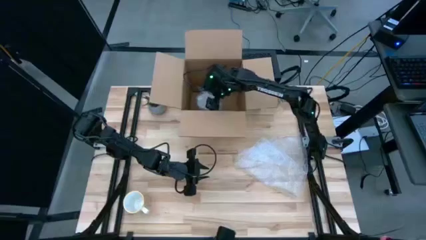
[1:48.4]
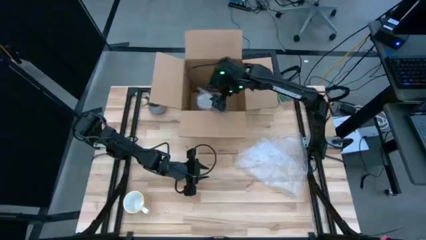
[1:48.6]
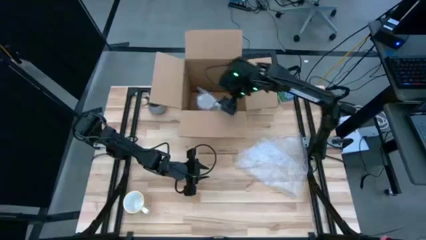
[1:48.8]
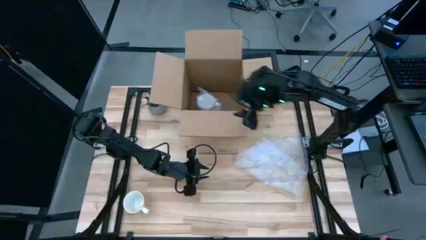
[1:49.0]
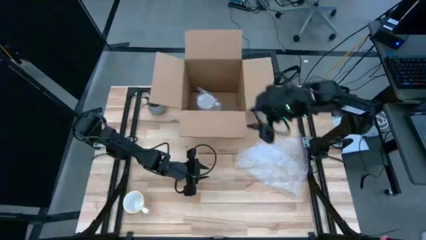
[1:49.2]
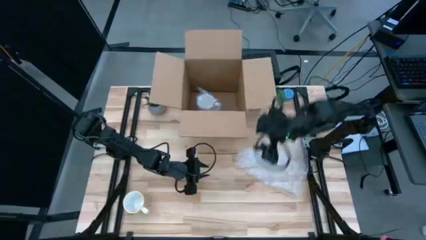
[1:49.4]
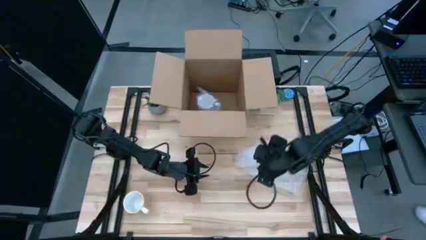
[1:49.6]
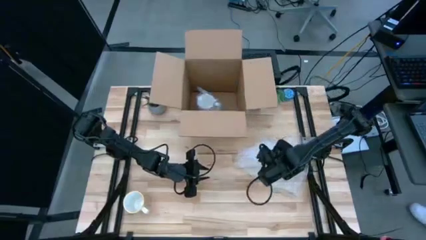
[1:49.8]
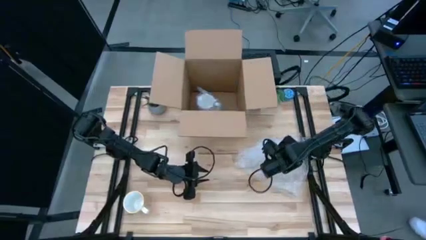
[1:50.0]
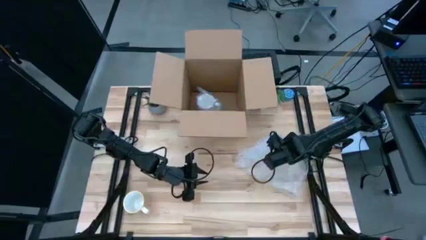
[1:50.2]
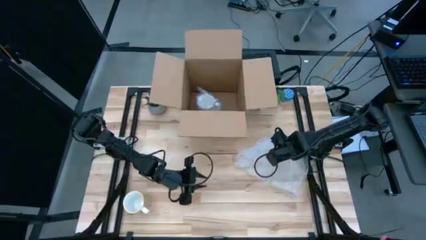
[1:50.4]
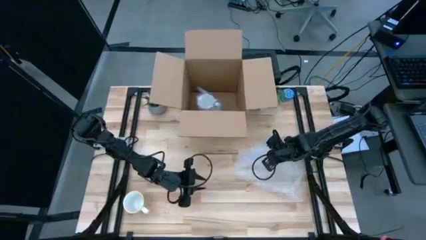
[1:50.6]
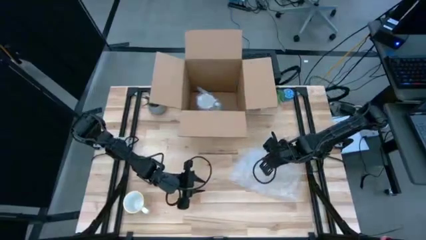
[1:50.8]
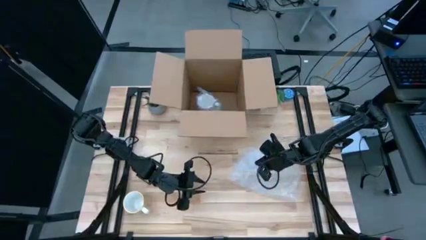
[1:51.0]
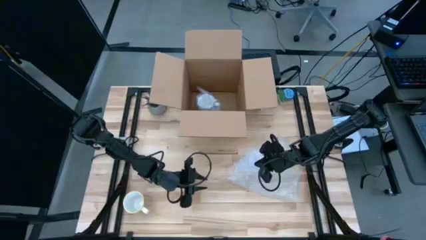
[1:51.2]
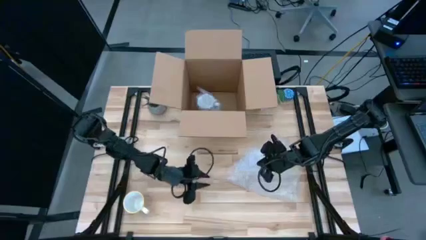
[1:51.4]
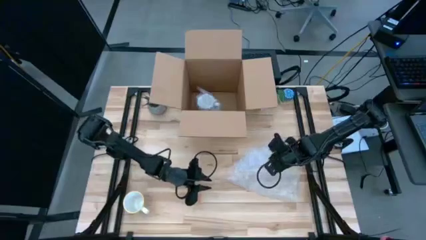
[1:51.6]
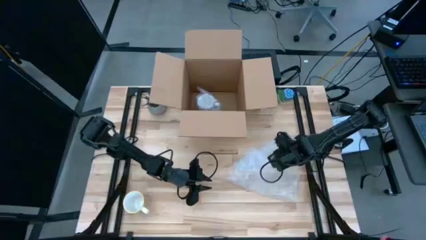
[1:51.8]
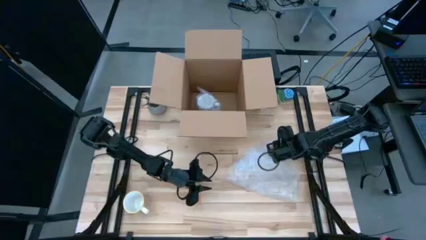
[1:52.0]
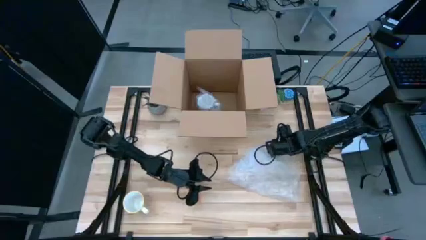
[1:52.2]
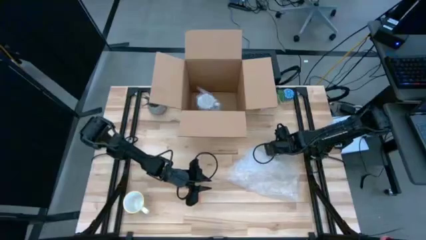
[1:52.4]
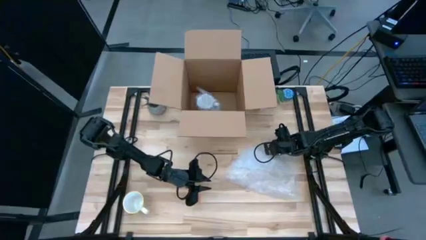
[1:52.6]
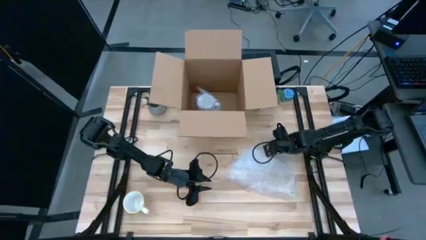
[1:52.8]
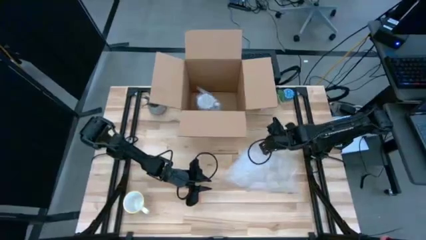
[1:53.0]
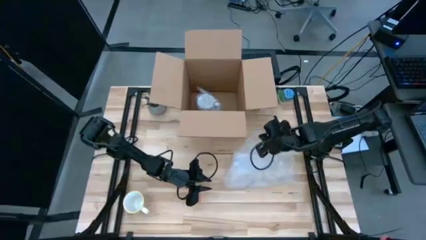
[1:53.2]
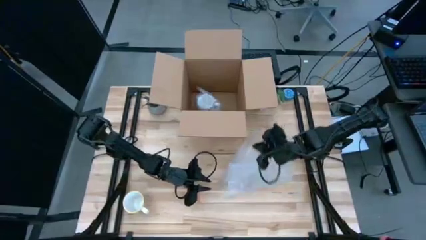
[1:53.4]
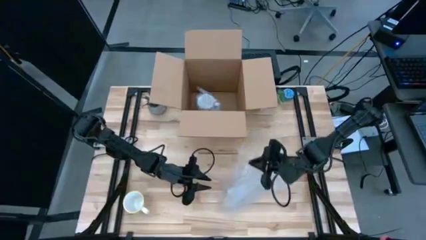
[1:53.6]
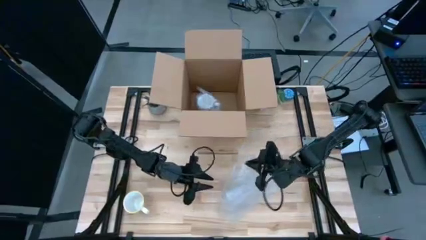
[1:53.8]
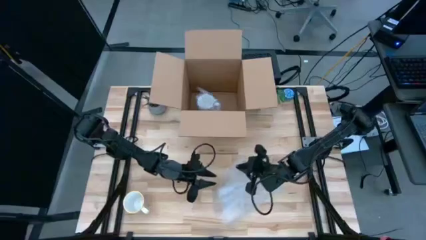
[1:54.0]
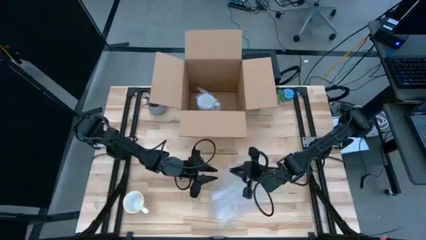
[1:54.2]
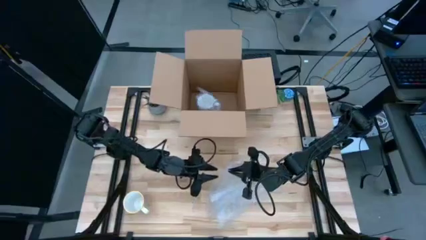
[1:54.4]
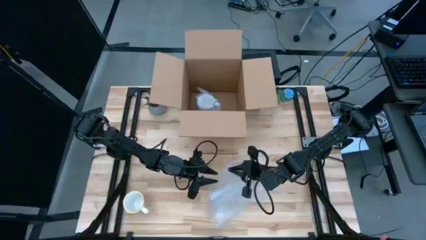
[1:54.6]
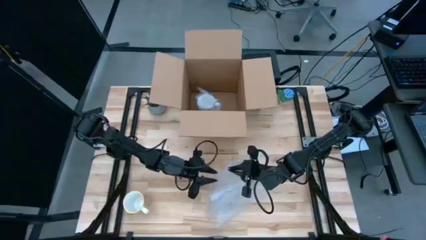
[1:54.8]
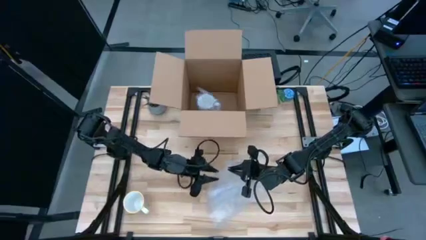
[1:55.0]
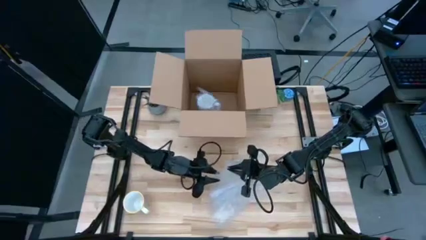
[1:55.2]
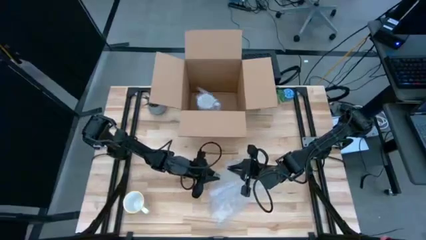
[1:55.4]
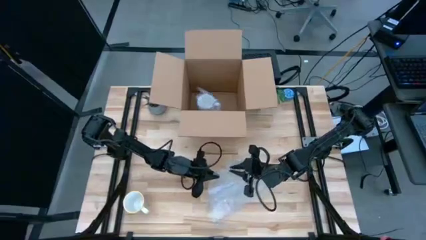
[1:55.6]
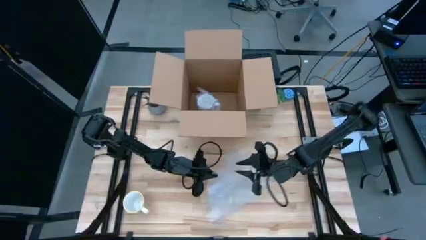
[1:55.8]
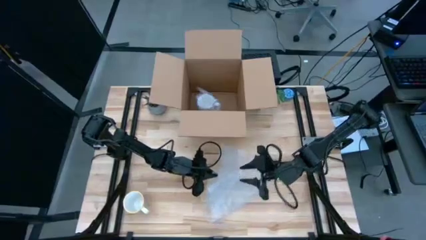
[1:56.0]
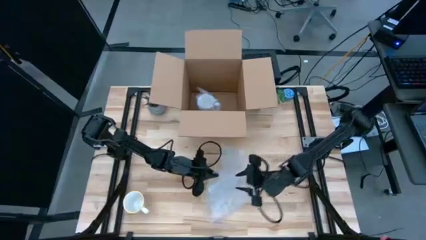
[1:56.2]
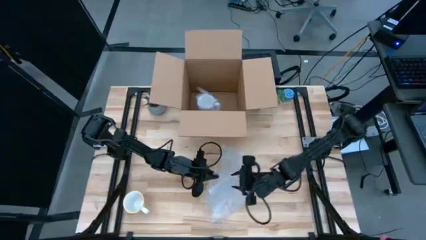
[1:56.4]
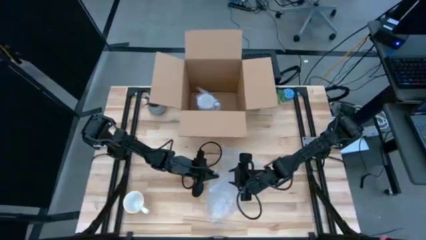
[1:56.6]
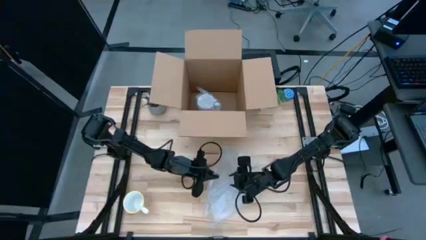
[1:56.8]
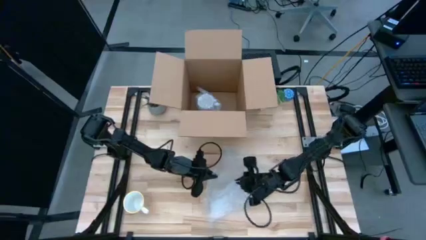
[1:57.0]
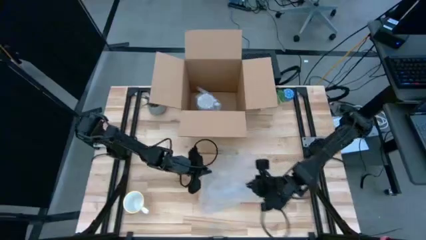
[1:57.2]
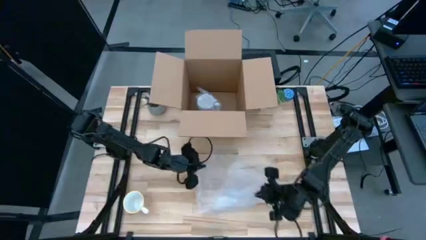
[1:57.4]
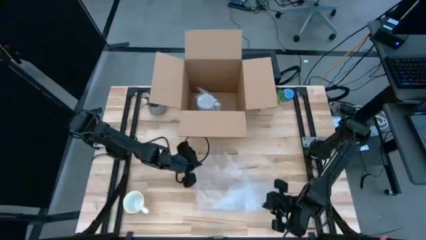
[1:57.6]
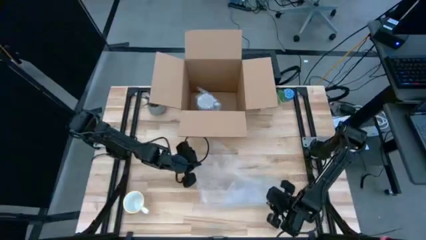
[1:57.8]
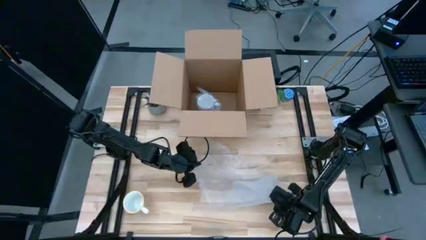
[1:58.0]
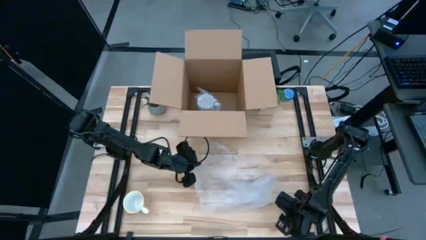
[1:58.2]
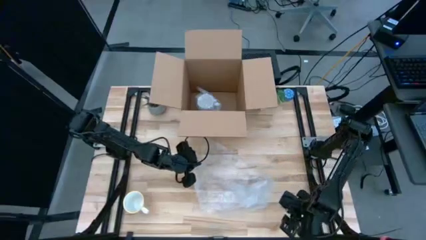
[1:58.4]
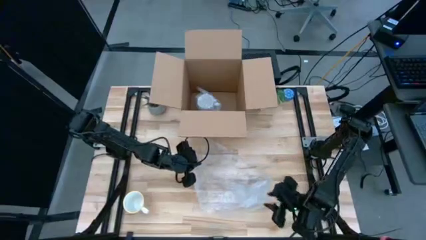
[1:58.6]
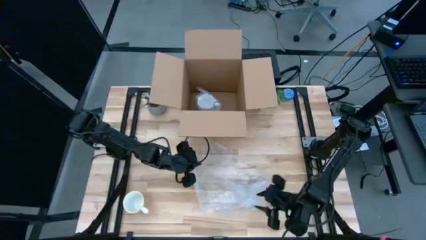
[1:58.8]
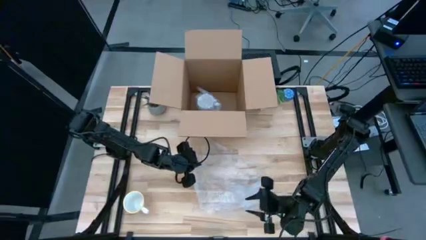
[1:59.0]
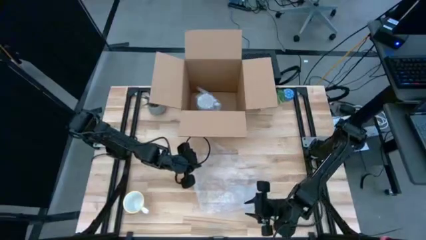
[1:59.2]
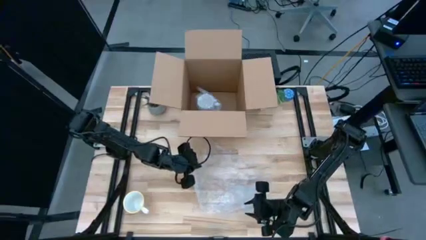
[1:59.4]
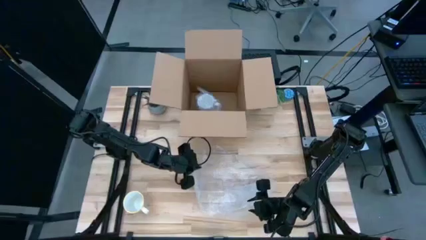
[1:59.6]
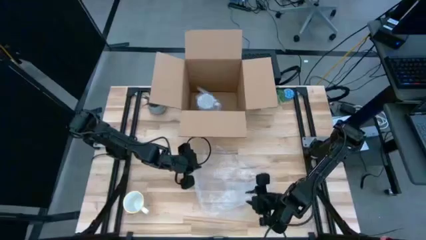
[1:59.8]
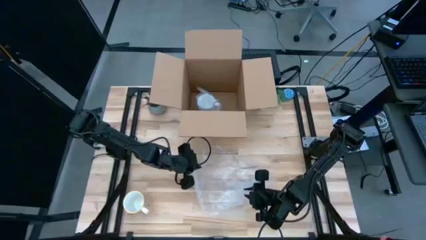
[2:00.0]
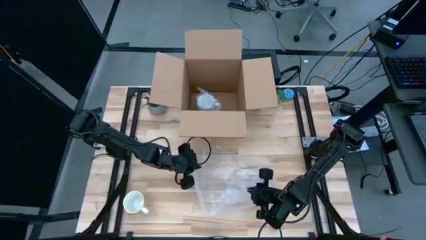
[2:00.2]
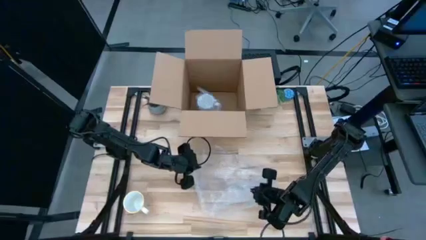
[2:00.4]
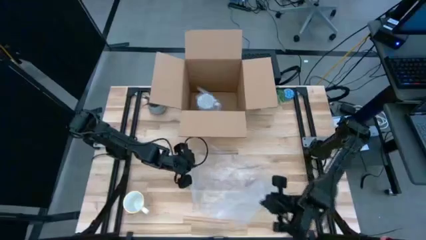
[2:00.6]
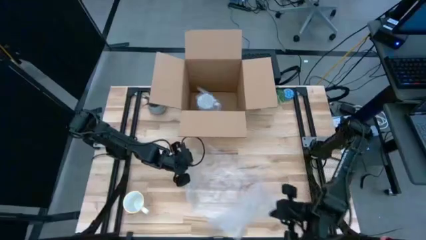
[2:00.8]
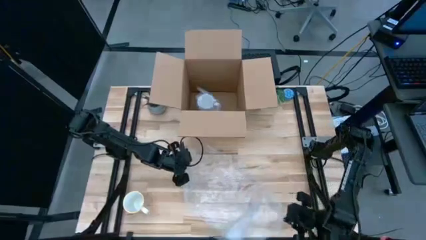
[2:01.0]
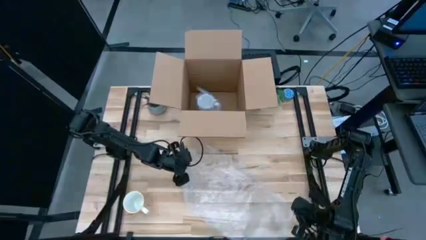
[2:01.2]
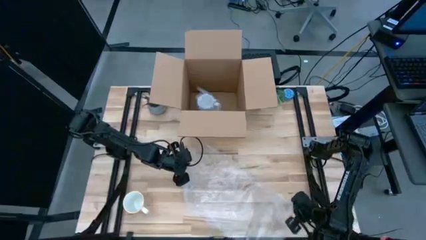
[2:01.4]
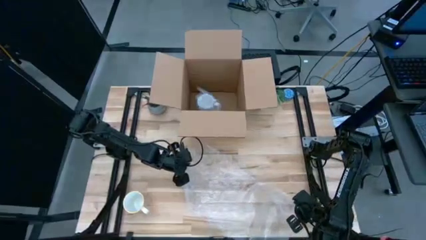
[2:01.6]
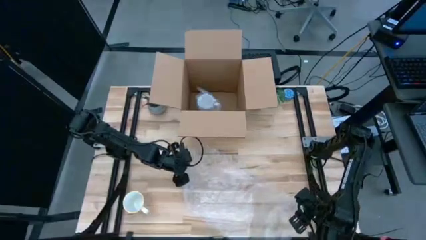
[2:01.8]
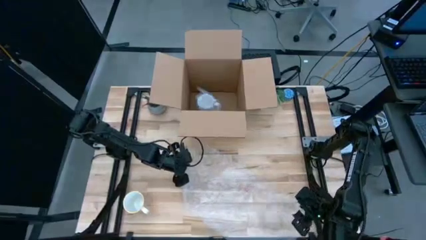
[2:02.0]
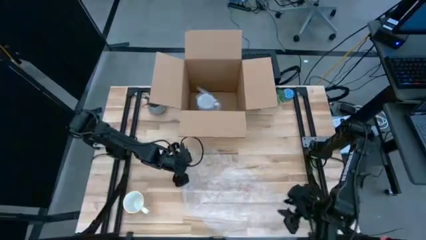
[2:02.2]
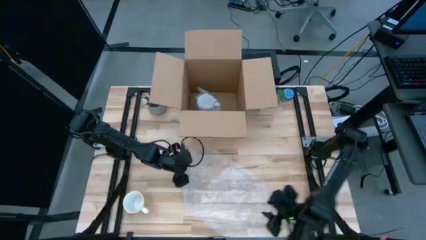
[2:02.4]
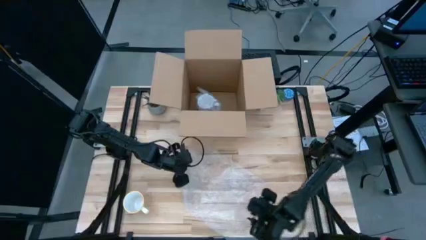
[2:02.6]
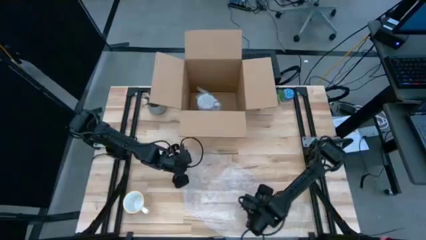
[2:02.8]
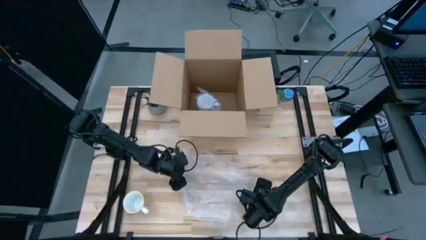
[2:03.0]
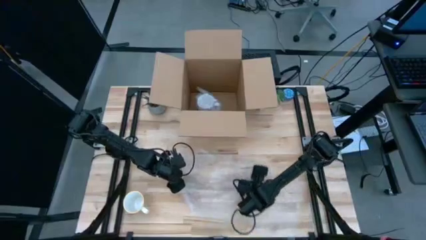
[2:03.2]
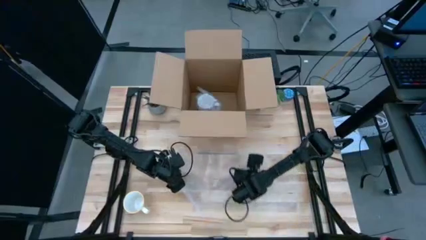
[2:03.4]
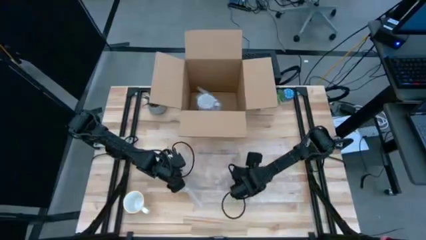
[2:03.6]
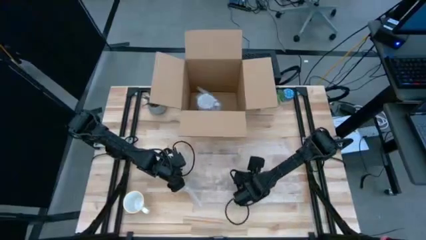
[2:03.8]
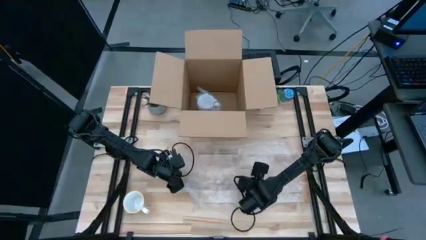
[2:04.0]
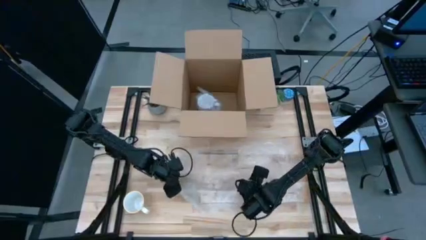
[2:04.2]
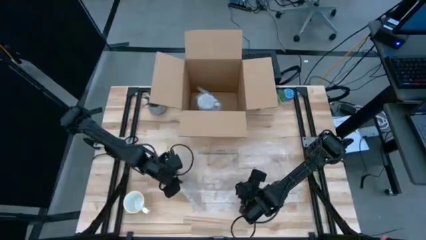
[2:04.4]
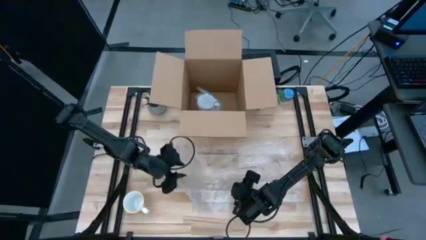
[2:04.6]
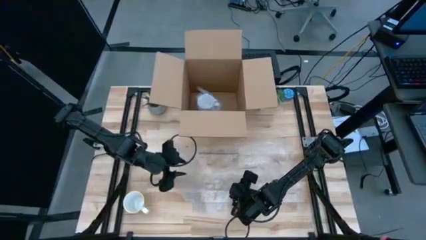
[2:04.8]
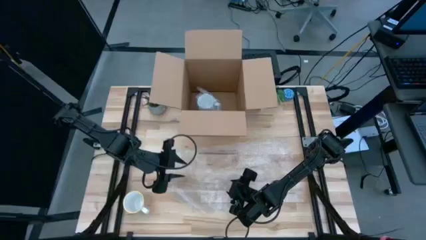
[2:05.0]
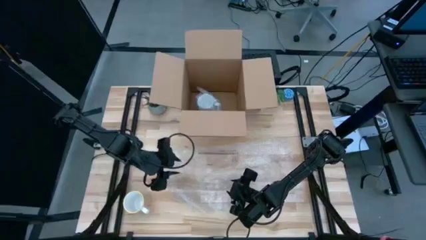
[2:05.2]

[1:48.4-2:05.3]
Task: wrap mug
Wrap the orange mug with bubble wrap

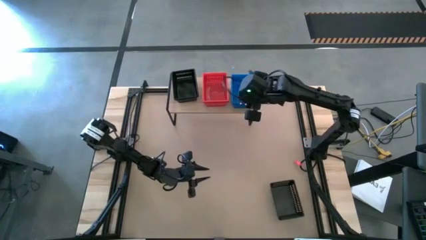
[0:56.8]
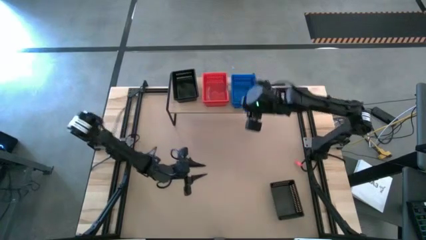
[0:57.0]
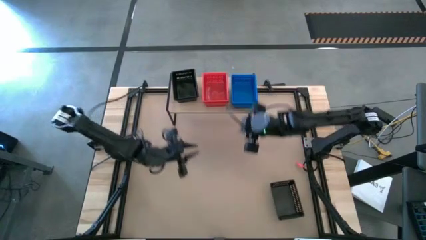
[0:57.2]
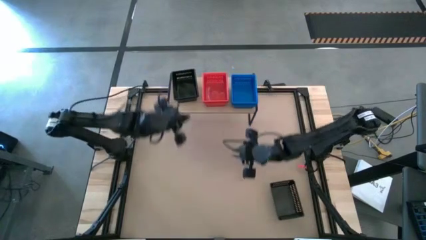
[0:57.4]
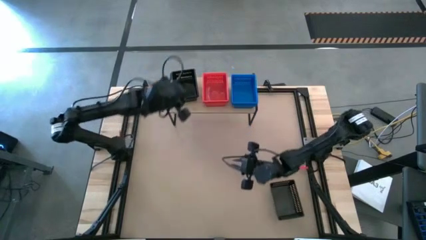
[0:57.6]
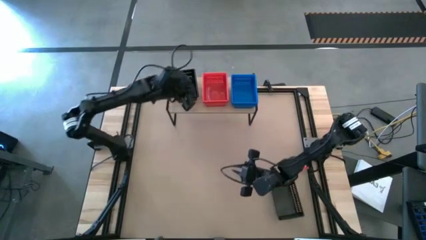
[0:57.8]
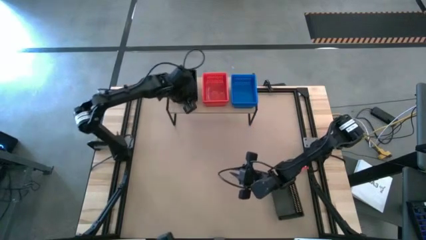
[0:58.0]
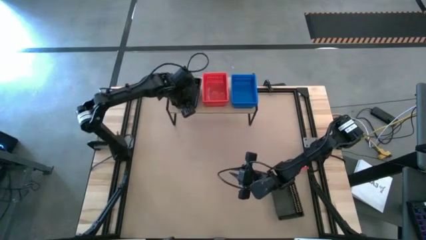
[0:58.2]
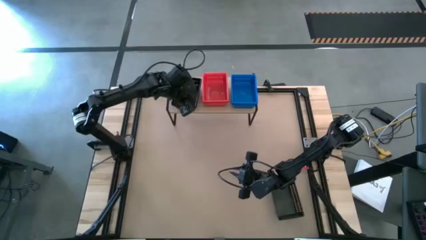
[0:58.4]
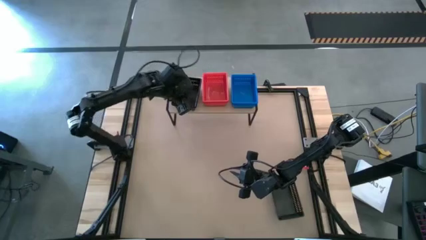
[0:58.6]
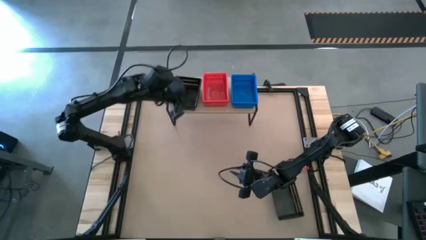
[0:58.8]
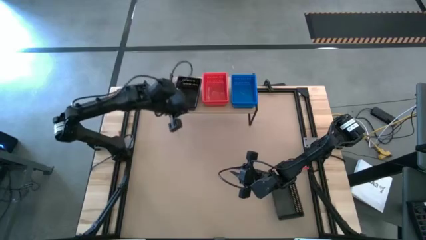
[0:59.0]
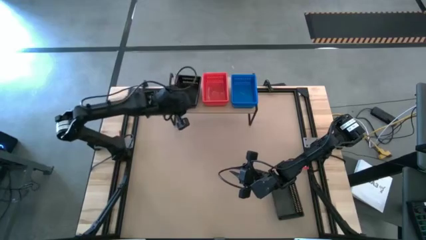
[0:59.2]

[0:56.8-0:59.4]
Task: Stack baskets on shelf by color
Adjust the black bins on the shelf
